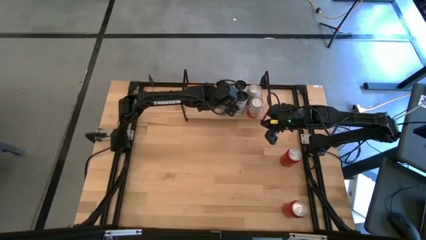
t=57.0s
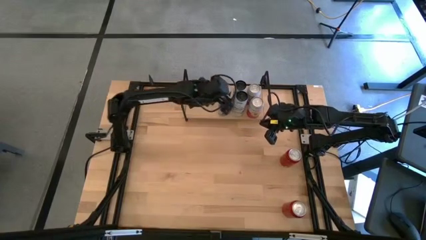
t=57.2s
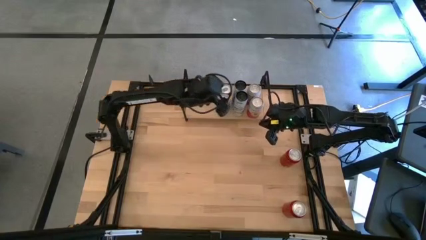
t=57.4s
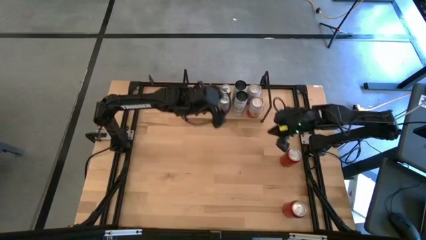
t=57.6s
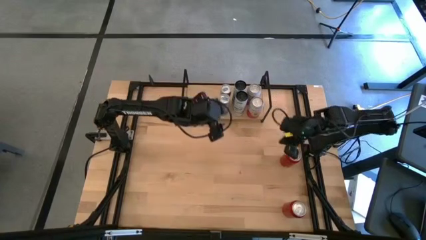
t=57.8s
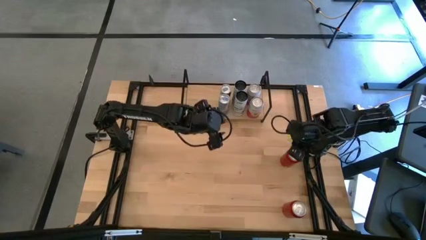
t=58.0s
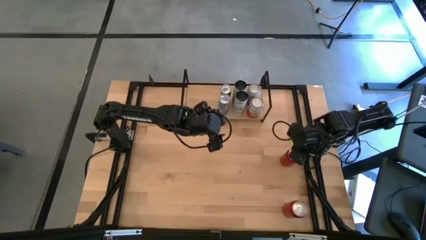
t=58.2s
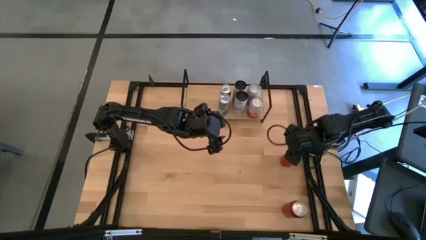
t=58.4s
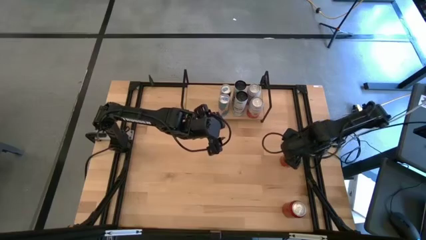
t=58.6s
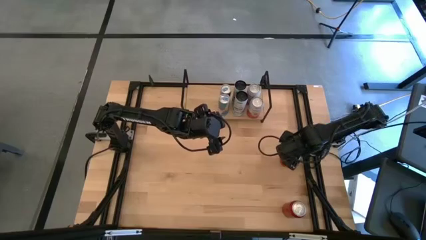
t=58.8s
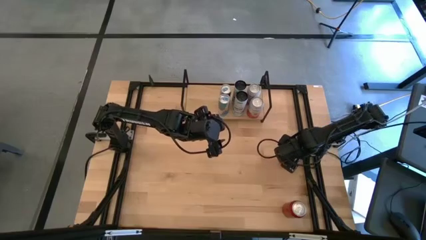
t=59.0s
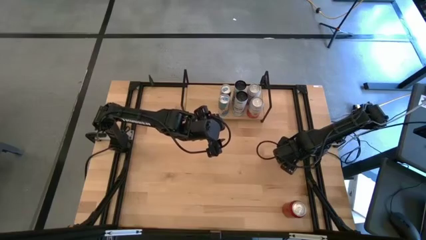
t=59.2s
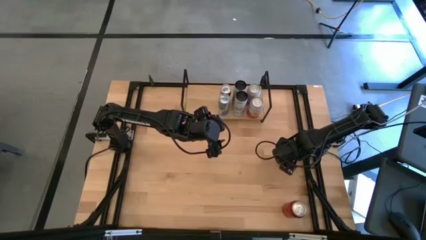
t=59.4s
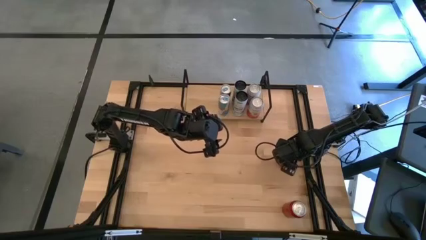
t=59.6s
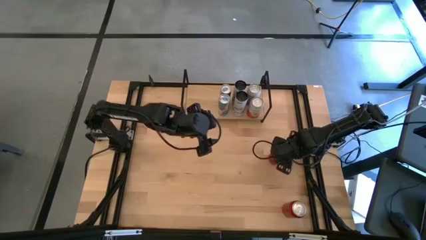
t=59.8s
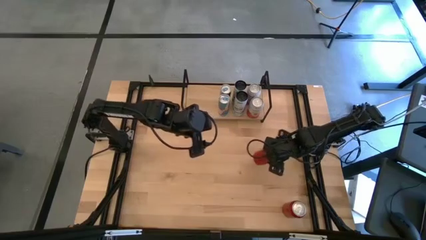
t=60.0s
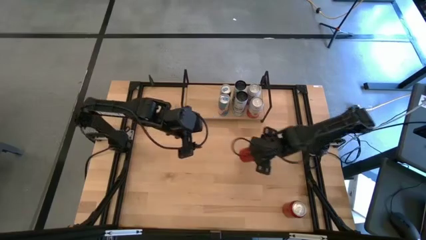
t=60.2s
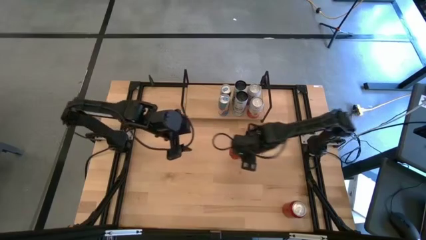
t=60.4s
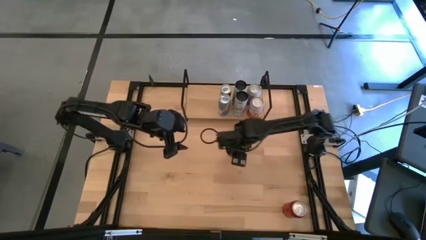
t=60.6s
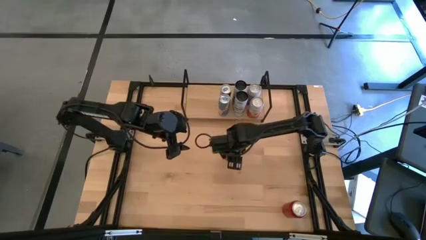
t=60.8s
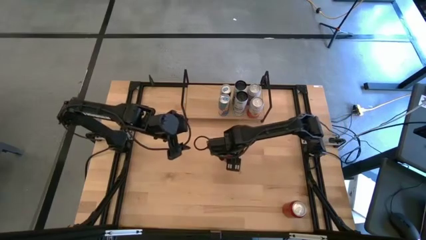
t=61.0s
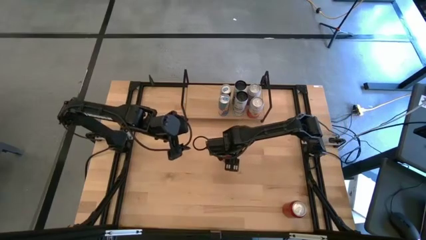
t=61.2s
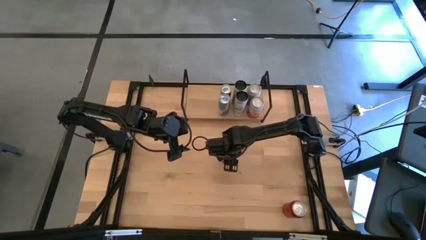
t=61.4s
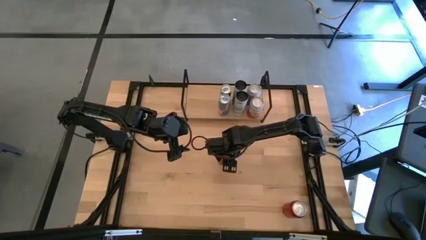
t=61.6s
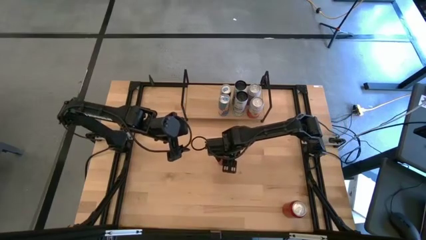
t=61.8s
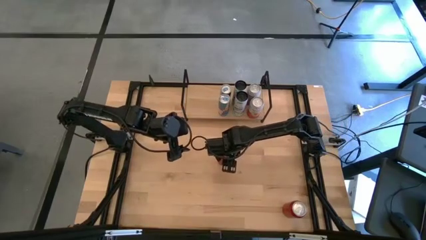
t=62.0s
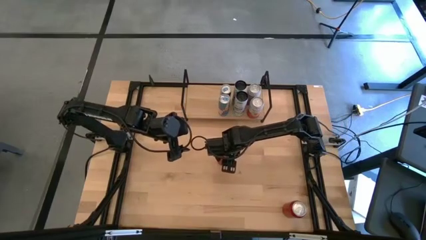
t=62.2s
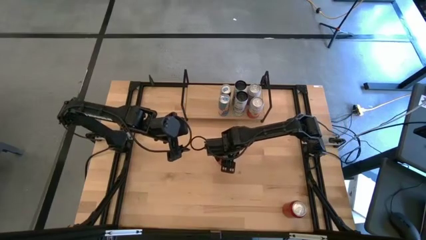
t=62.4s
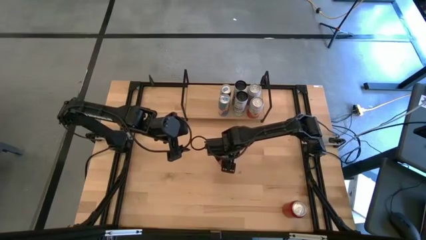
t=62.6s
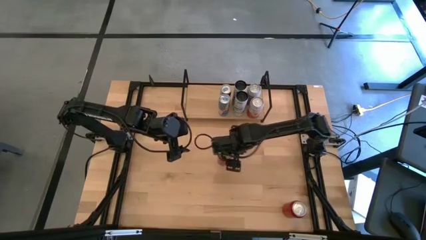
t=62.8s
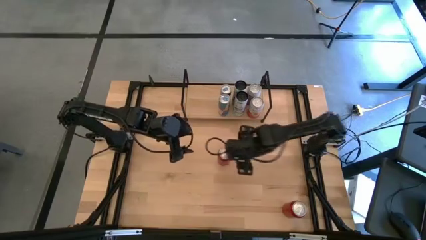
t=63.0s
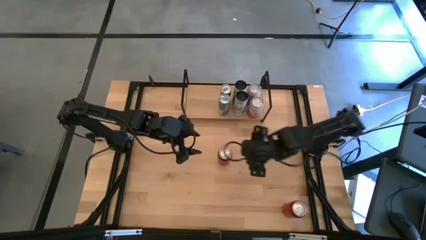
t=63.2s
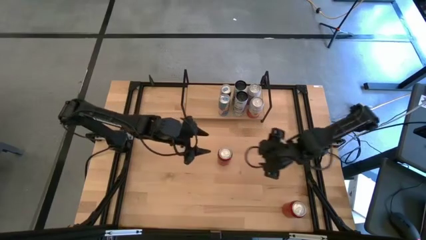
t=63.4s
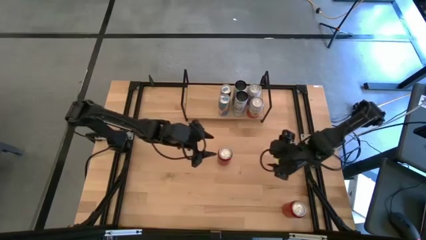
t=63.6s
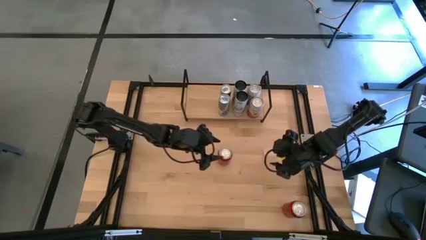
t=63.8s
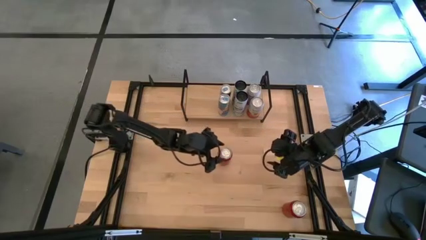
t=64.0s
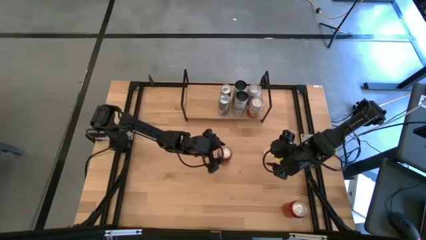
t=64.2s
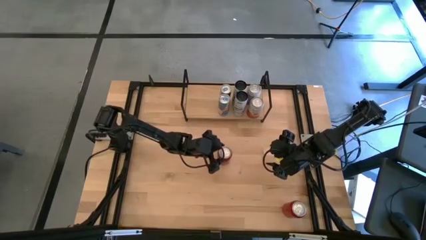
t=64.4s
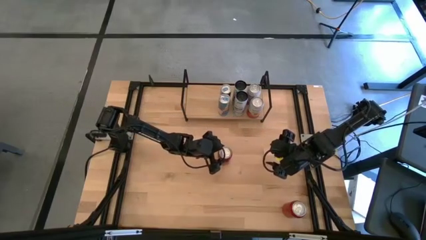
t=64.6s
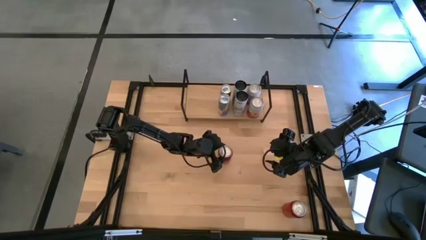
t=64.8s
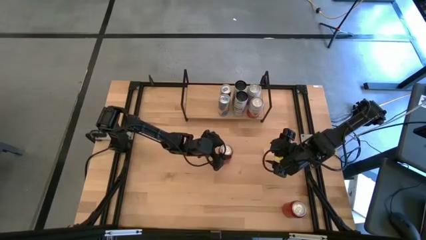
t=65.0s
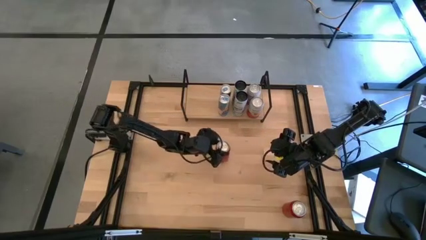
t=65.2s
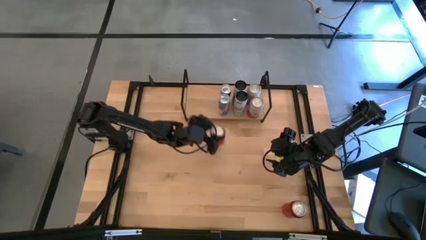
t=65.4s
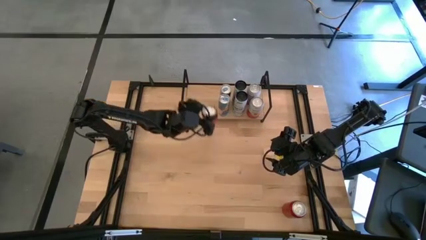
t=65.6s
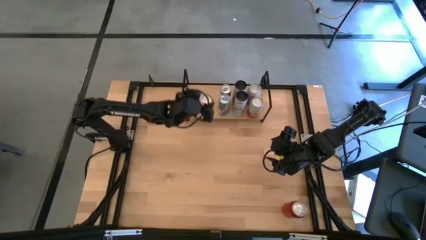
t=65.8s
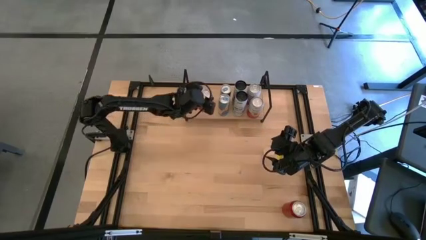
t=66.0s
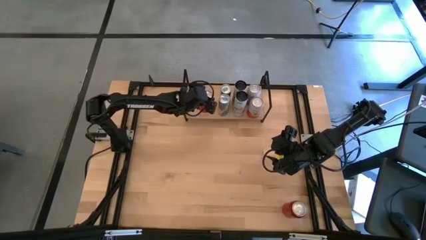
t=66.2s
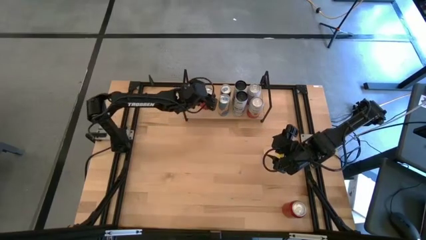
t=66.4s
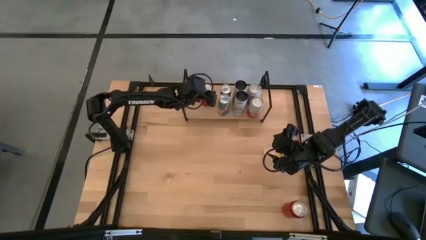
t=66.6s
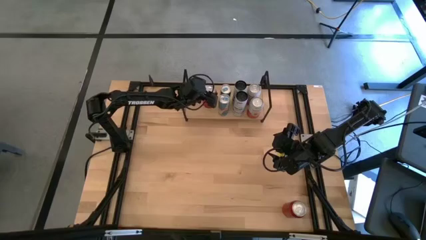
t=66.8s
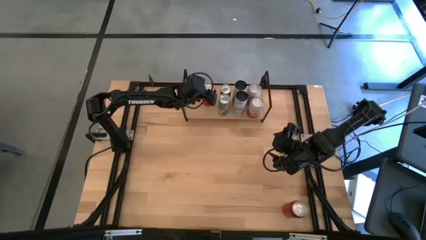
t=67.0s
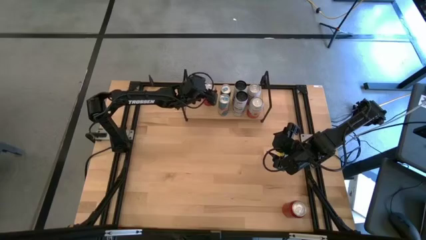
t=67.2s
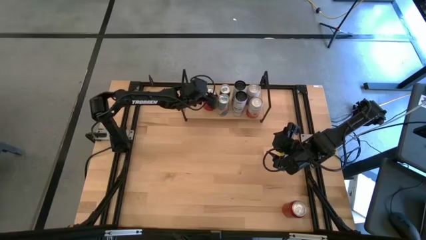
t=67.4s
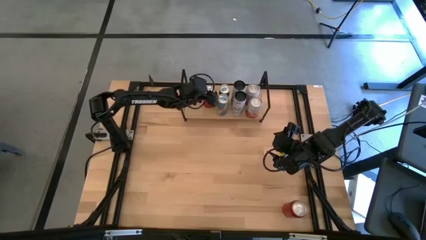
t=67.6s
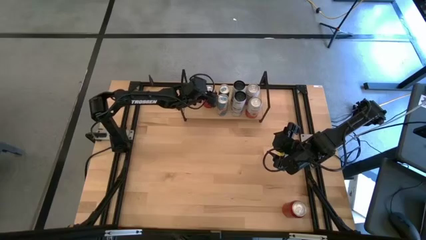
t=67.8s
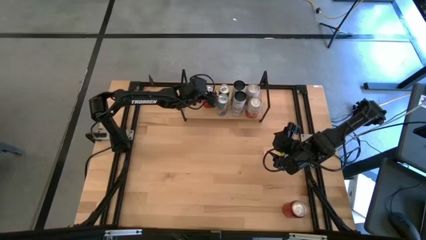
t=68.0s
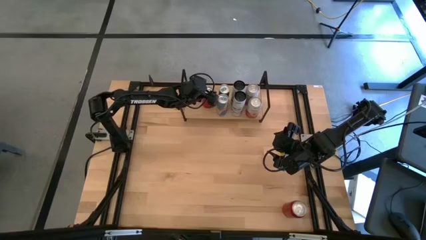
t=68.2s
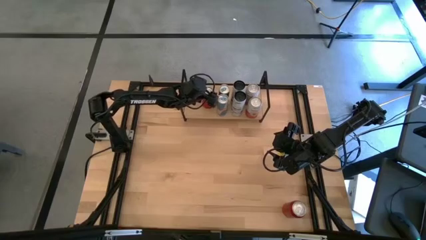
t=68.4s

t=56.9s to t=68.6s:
Task: Place canned beverage on shelf
Put the top red soda can on the shelf

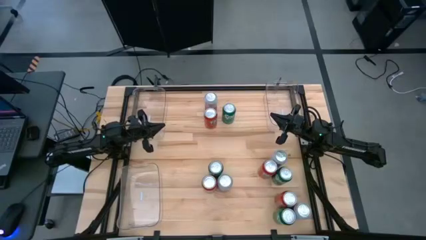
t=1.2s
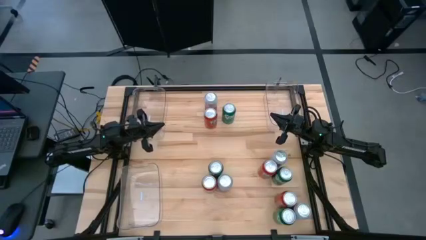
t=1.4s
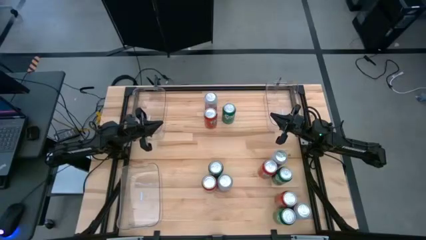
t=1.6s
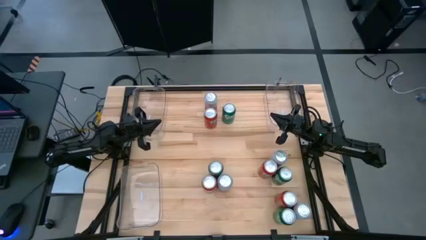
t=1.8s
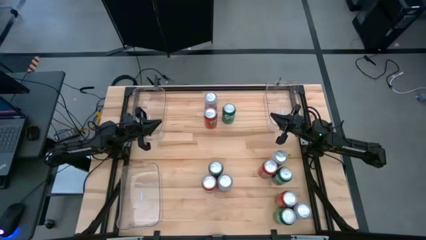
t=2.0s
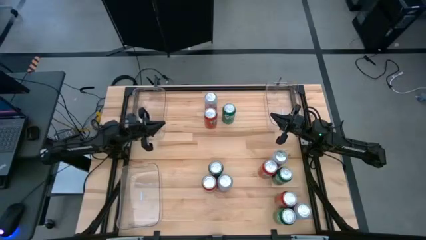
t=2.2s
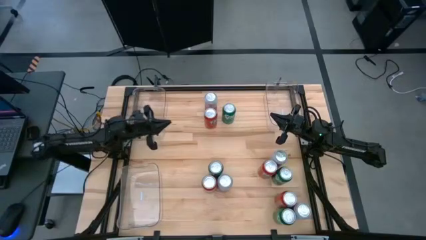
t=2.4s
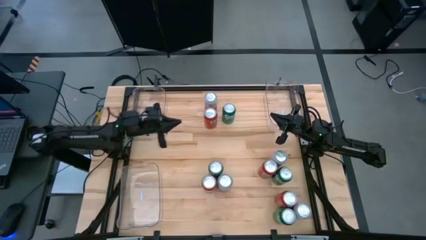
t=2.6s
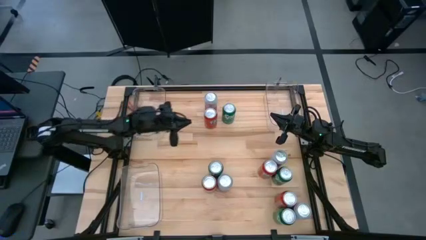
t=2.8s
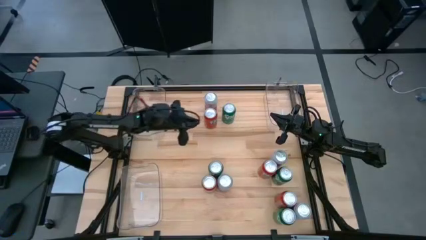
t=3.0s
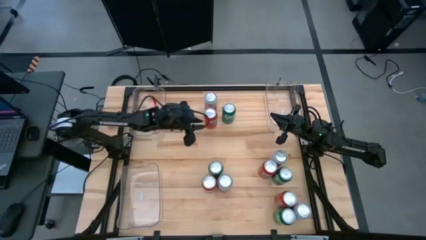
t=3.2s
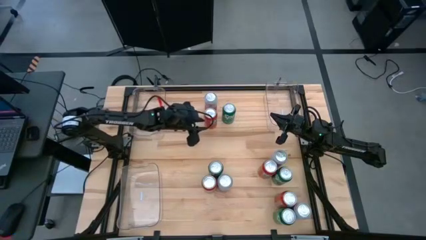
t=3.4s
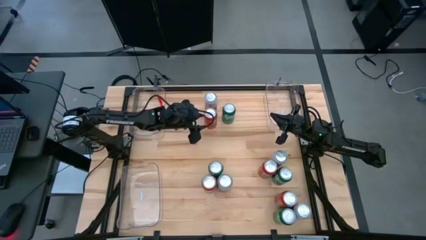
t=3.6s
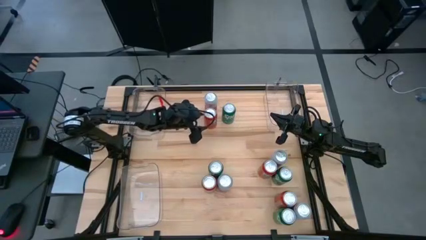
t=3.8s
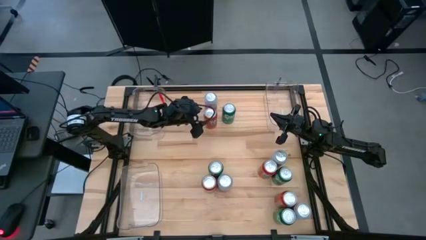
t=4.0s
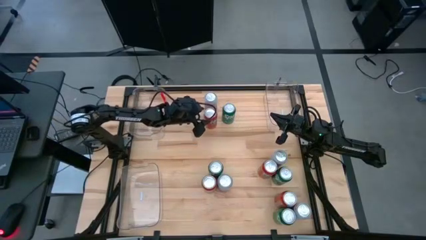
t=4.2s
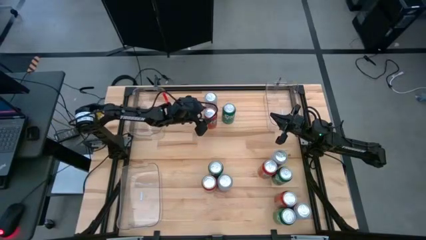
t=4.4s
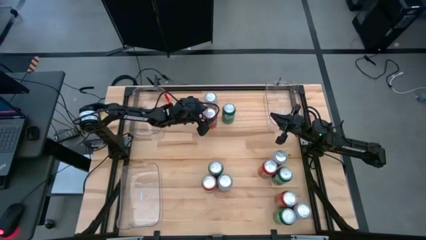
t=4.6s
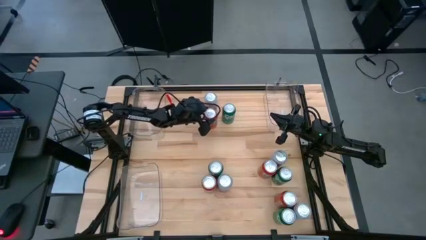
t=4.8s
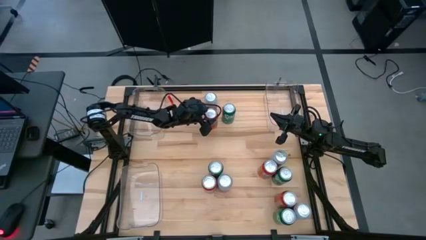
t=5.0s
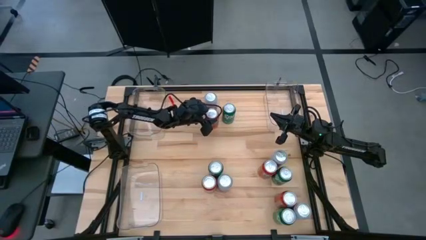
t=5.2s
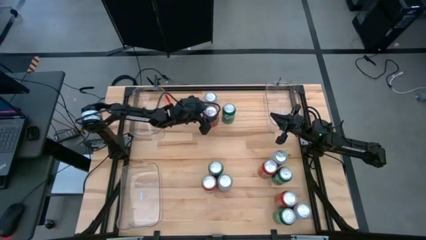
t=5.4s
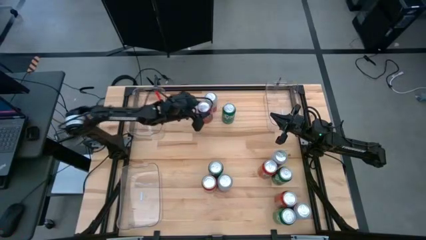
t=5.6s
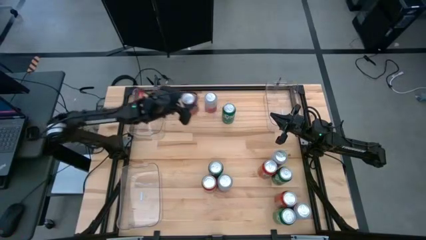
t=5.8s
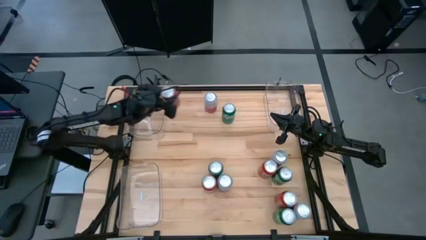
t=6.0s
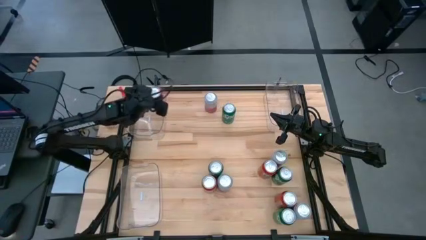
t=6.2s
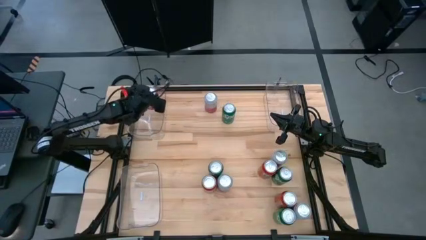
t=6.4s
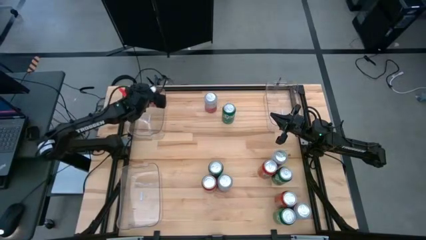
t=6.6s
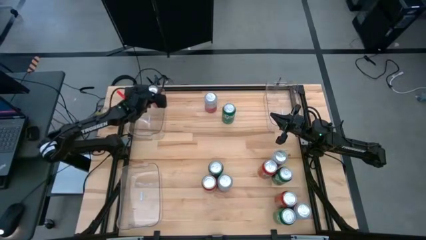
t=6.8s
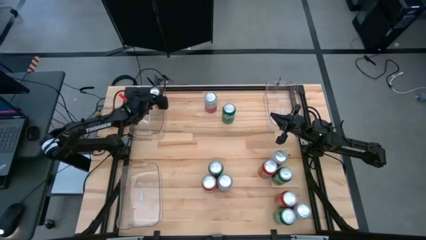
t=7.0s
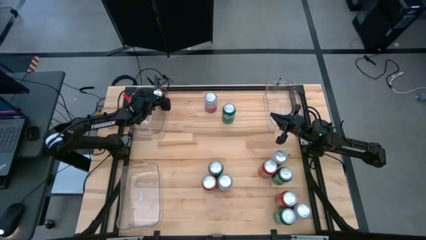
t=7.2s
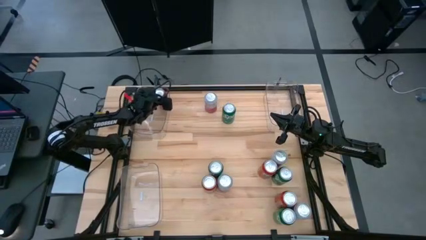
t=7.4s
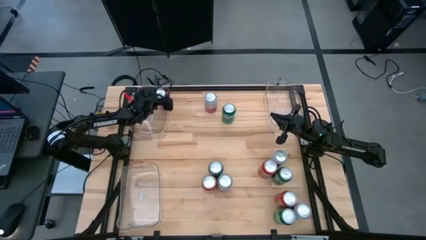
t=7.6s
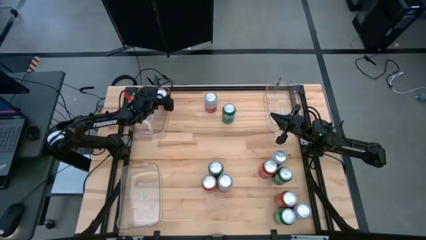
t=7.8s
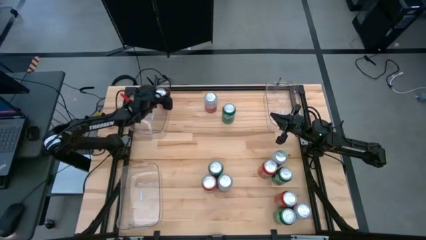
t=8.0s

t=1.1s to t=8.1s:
Task: Sort soda cans
Put the top red soda can into the top left transparent bin
